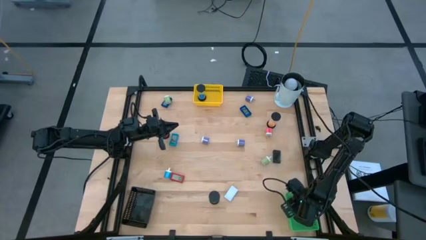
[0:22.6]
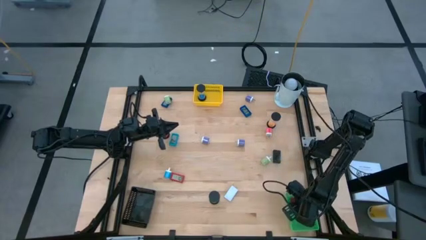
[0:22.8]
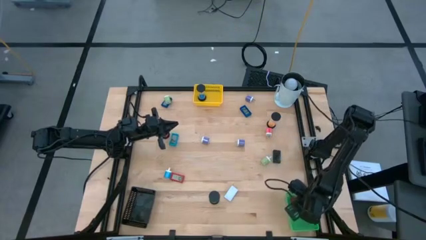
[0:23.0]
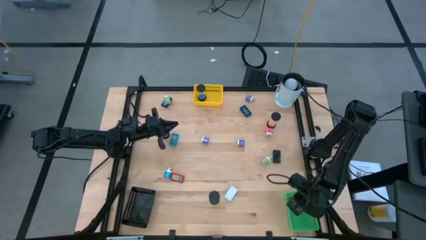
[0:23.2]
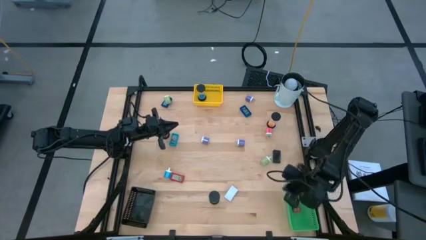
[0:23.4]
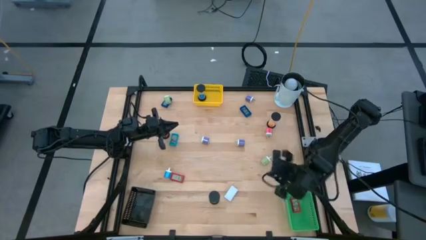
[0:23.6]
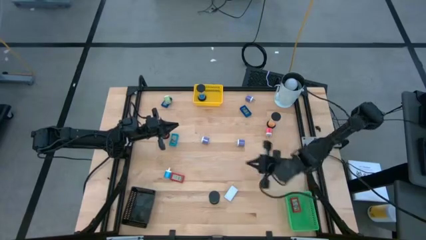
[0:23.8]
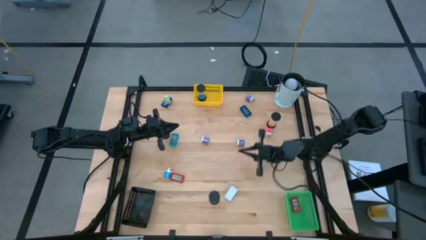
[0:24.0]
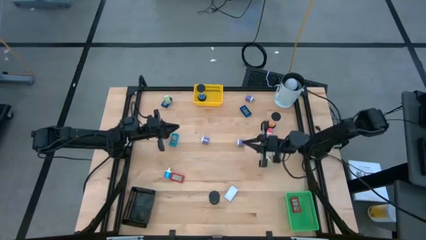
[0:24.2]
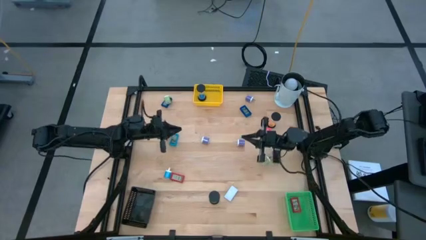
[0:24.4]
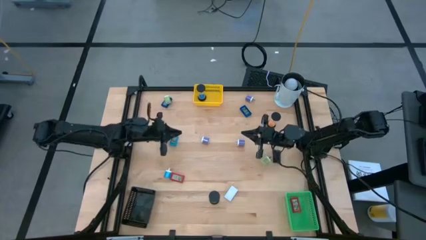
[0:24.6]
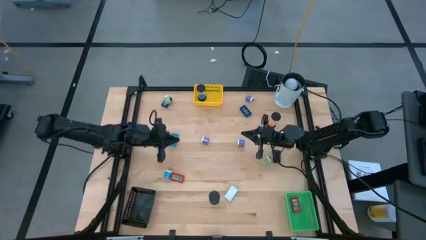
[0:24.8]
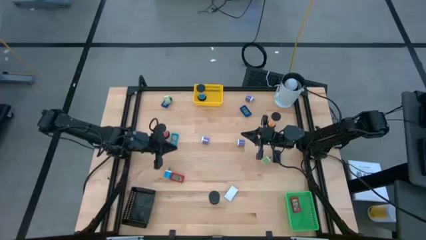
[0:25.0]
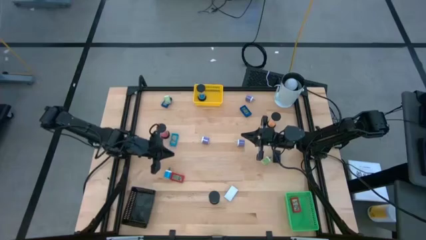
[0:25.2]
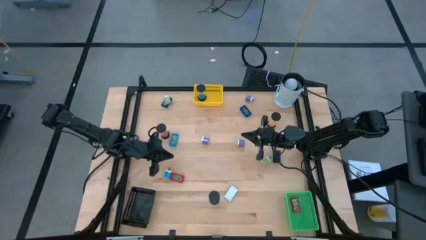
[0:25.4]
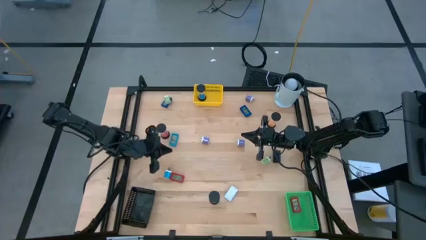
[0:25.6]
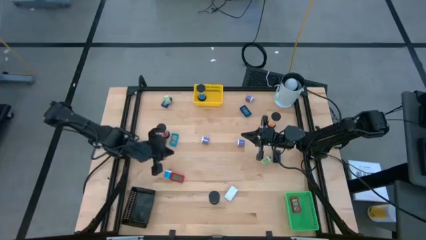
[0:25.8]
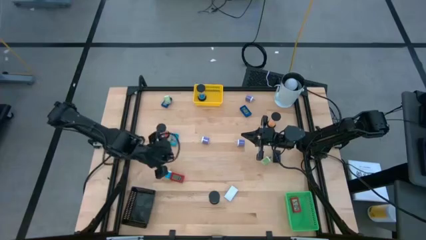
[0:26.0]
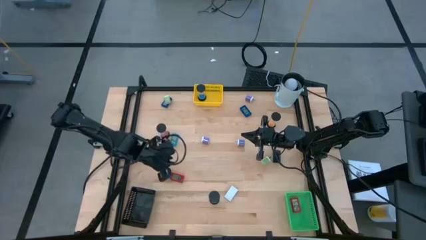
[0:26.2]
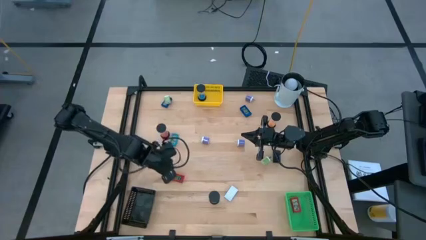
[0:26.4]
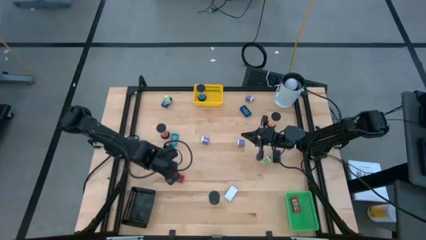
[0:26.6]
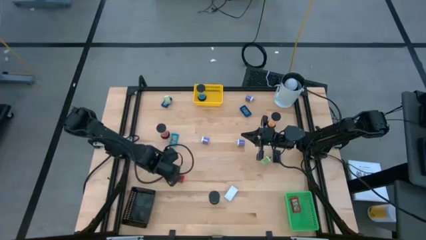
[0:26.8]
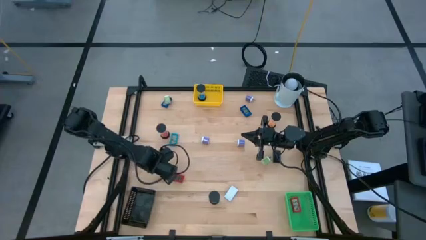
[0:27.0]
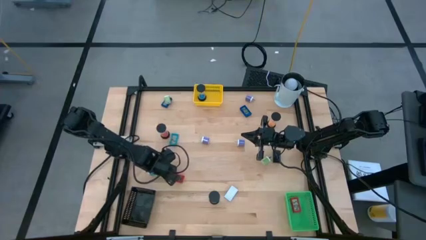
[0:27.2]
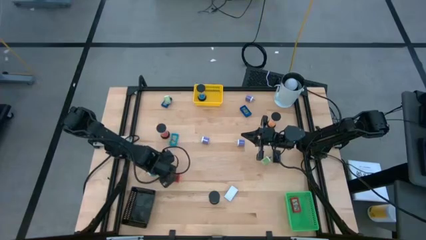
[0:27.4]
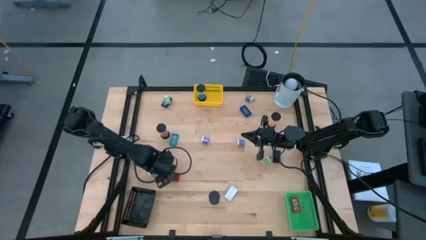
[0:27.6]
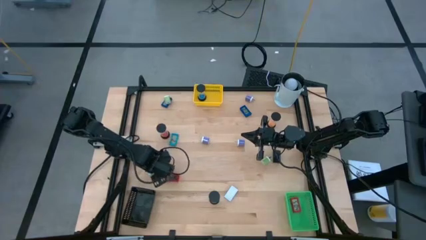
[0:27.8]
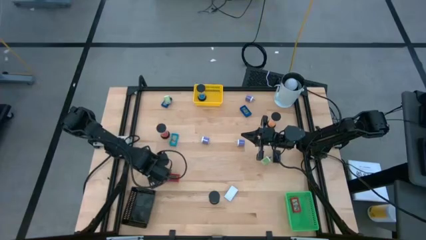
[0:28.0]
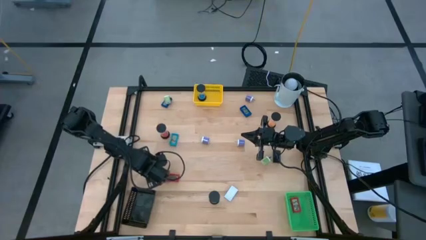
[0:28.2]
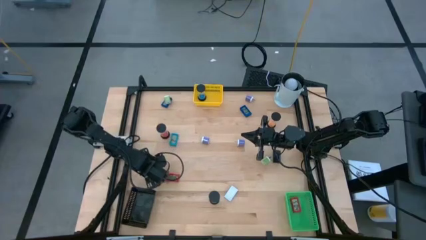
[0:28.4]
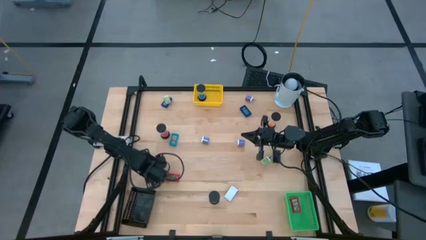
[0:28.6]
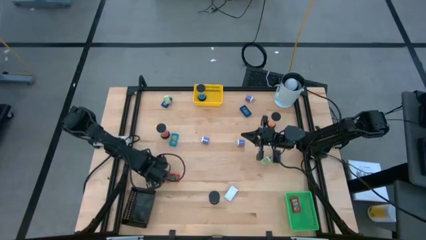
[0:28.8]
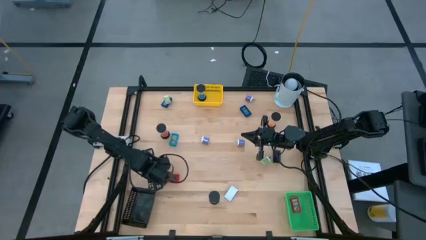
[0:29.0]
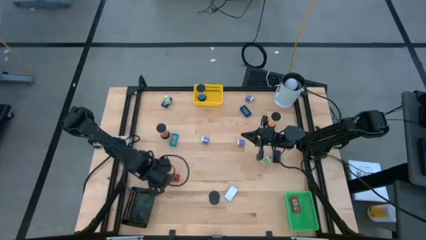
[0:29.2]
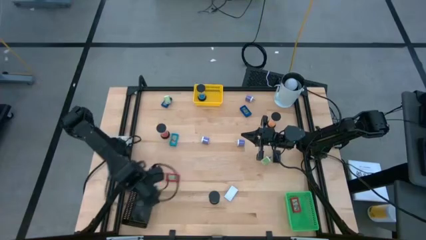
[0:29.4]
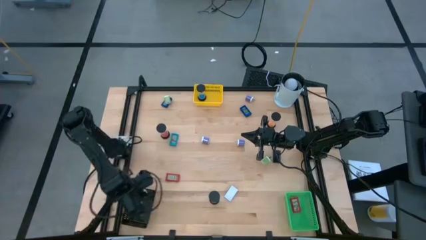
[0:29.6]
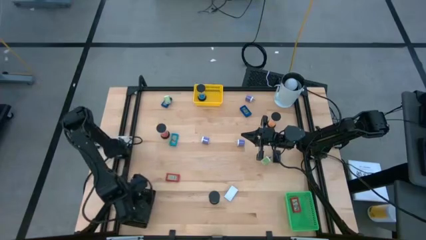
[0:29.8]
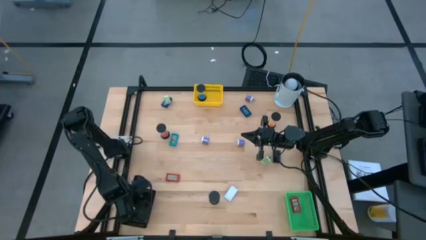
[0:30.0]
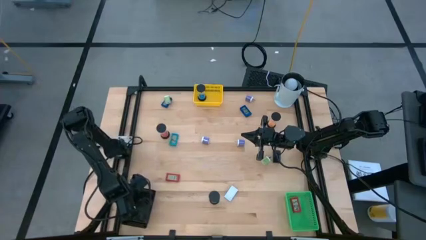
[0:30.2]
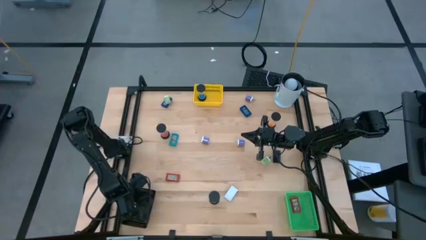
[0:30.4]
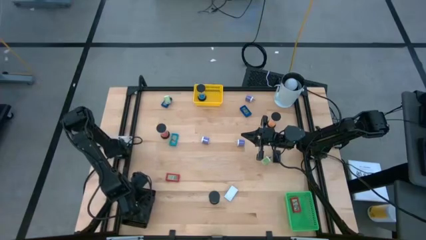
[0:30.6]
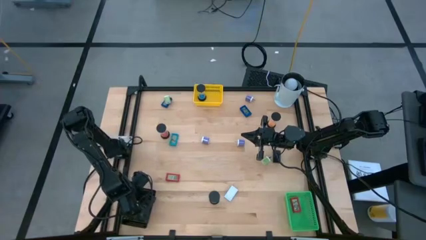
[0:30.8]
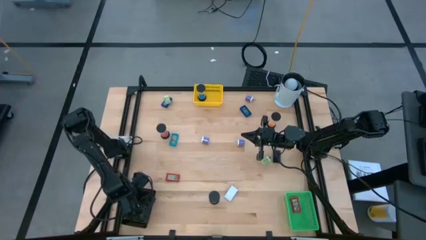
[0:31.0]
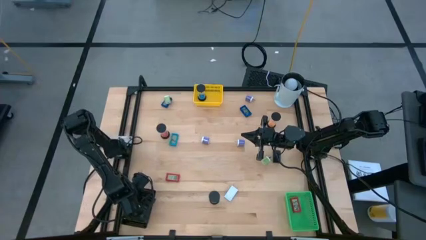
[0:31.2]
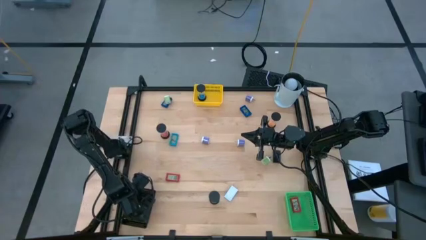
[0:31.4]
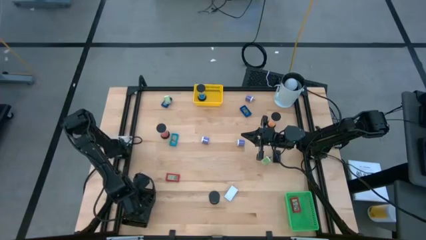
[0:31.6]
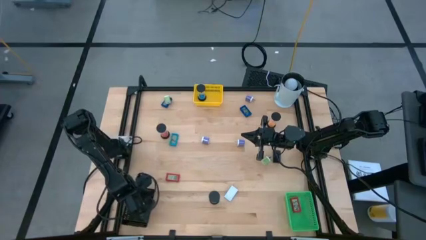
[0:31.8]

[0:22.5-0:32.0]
Task: Pick & Place Office items
Put the blue charger adapter into the black bin

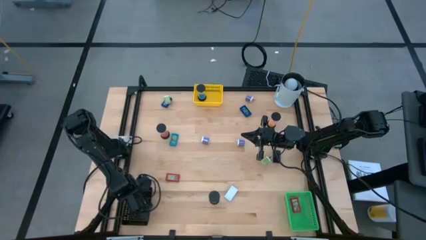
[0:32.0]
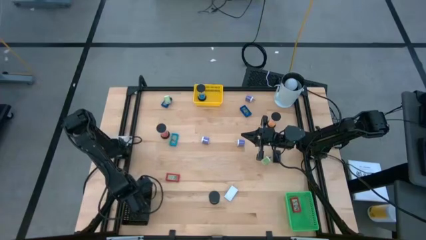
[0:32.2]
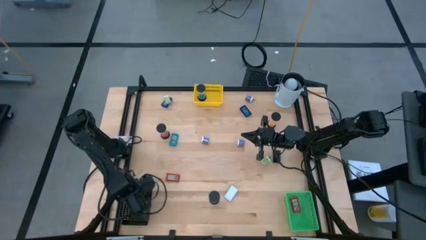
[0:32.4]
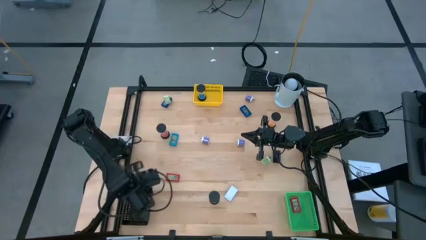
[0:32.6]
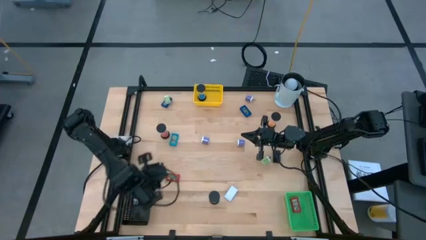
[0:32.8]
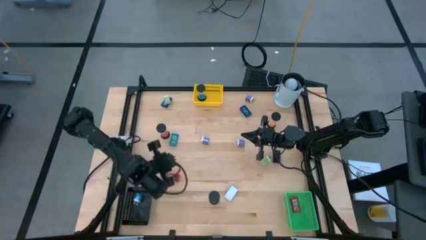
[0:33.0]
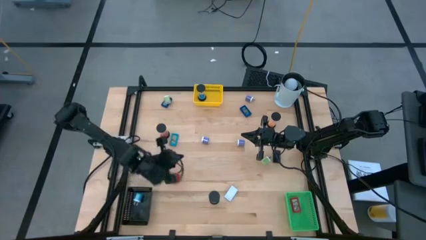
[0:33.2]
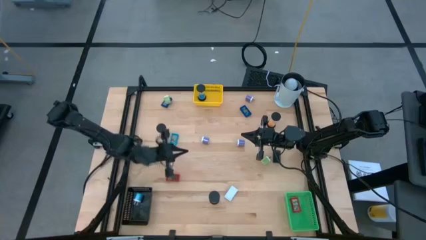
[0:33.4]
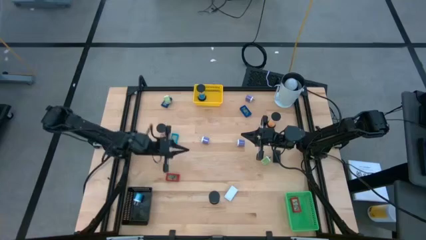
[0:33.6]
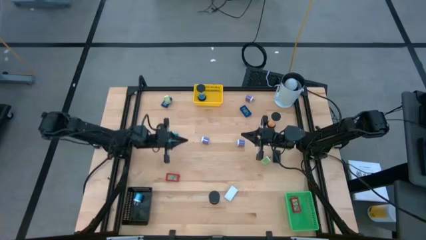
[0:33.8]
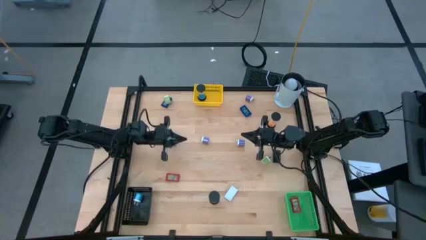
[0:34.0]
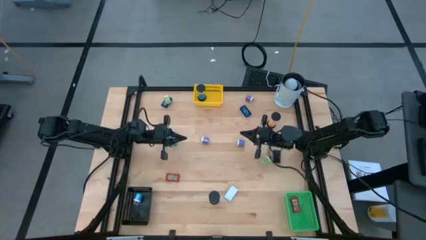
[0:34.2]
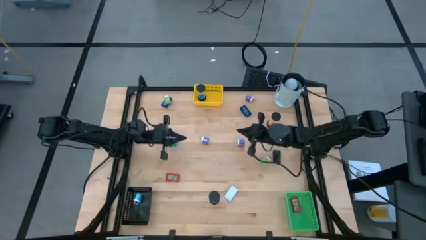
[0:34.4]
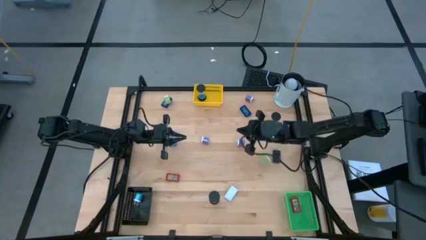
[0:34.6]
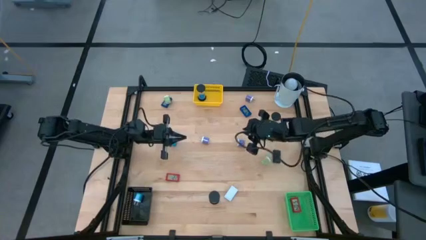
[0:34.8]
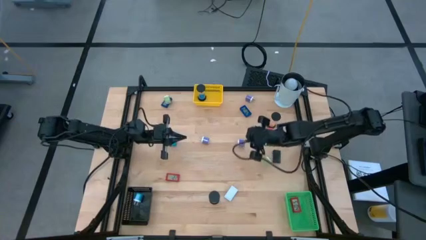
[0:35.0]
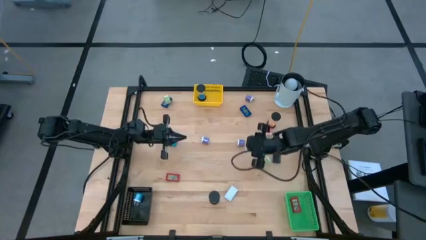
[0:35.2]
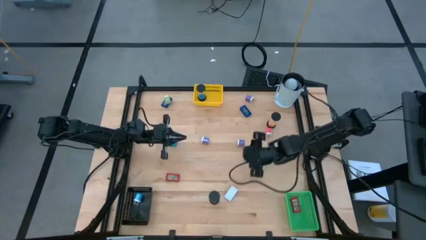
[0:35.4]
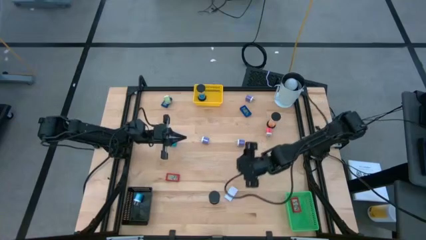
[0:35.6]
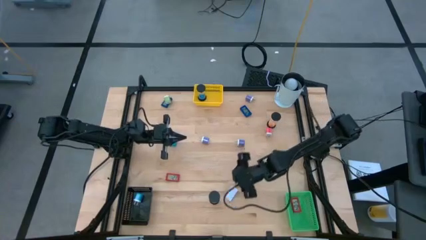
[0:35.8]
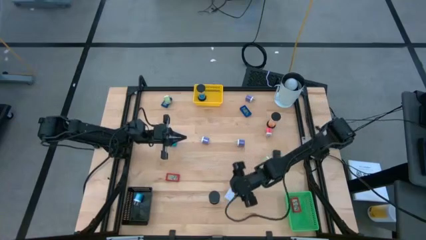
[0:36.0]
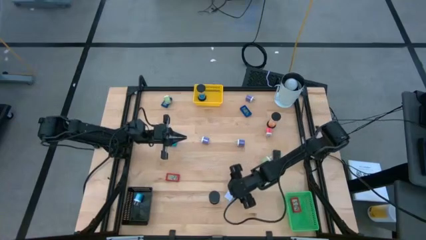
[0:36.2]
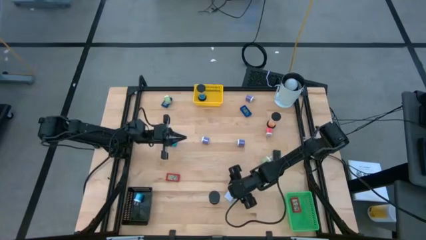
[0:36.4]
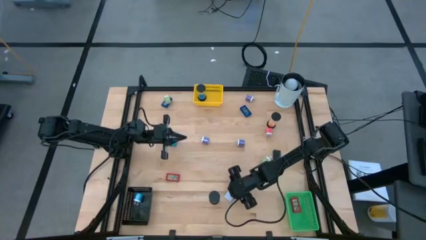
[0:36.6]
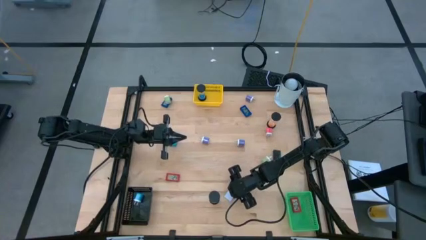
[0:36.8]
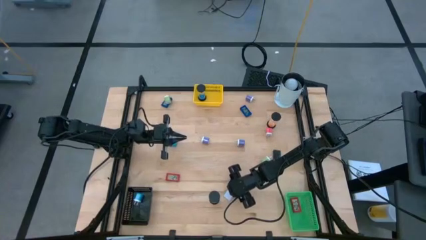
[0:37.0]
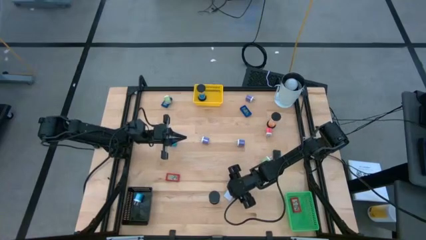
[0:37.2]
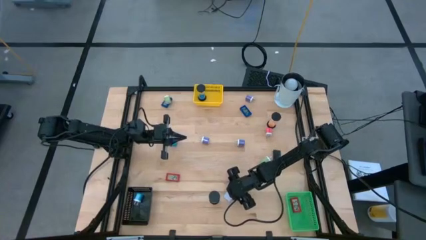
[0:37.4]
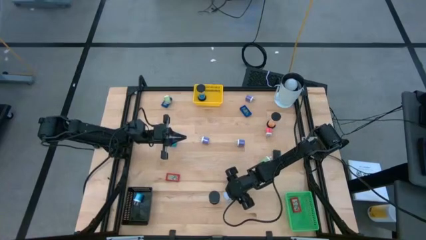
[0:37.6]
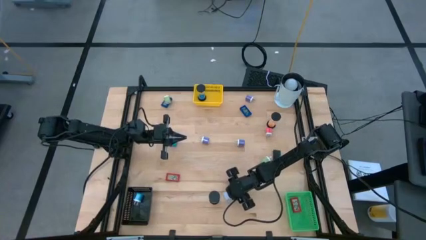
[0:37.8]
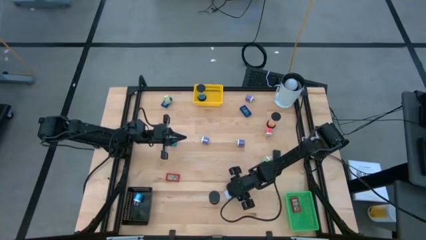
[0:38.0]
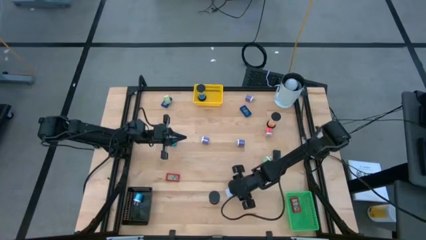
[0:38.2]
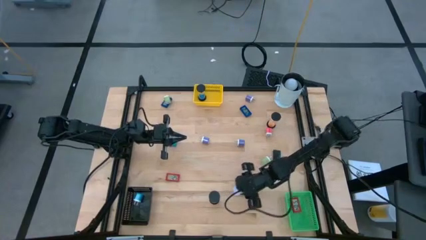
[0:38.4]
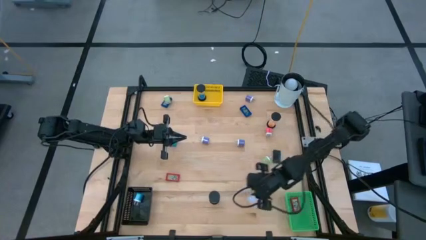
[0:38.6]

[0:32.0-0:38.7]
Put the white digital timer into the green bin
